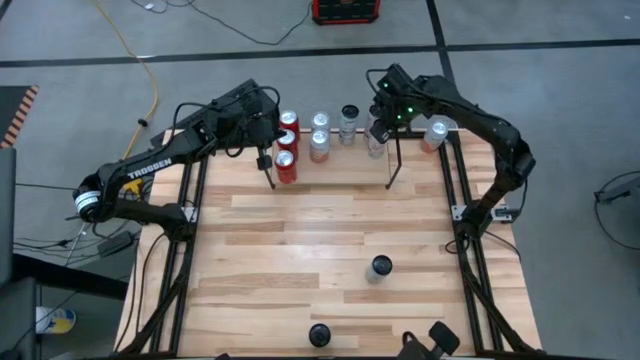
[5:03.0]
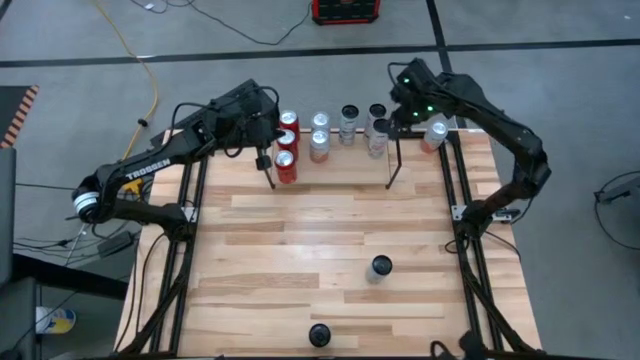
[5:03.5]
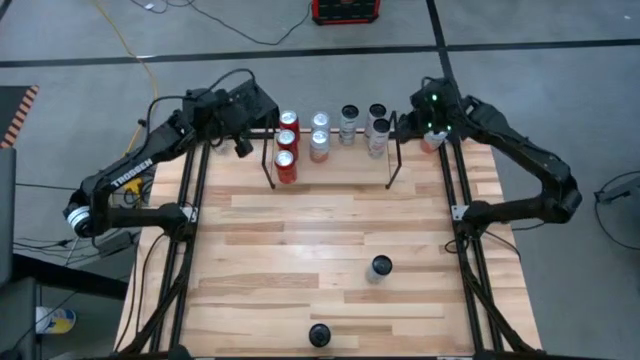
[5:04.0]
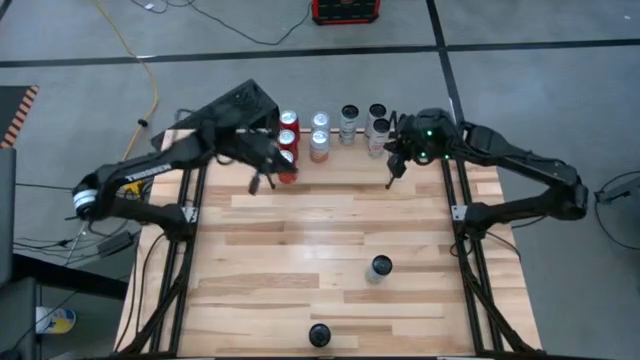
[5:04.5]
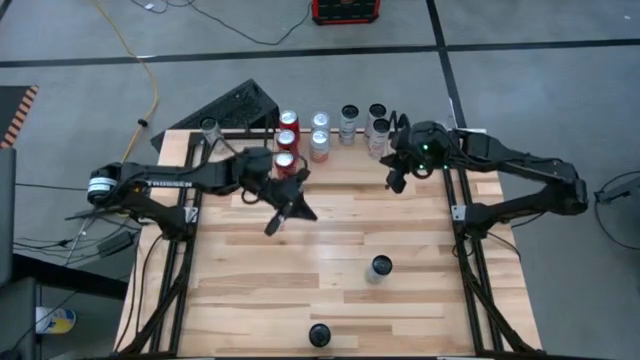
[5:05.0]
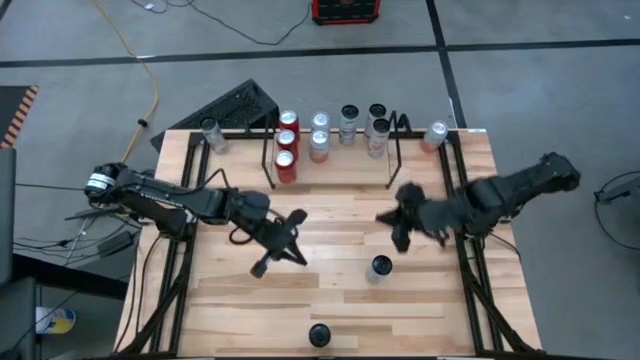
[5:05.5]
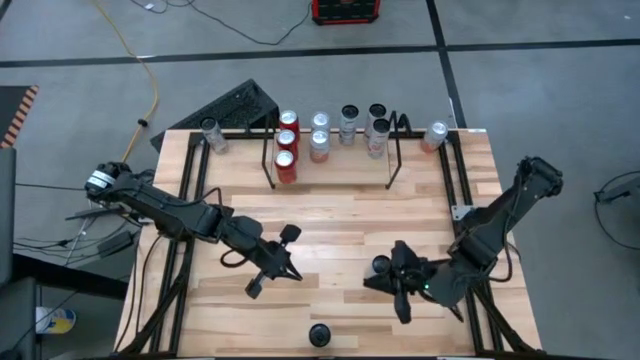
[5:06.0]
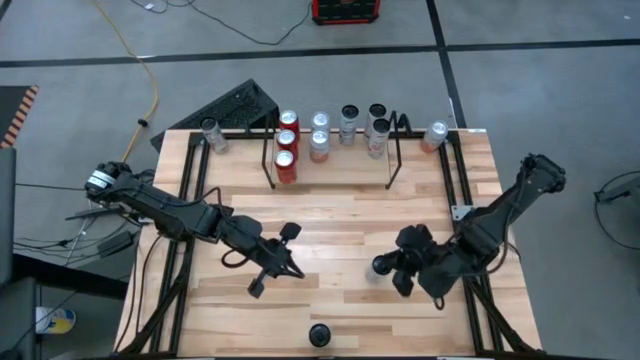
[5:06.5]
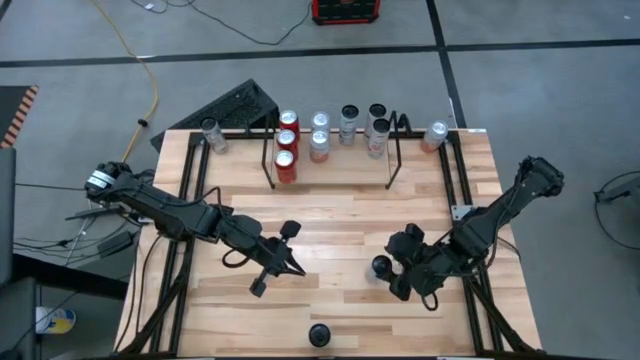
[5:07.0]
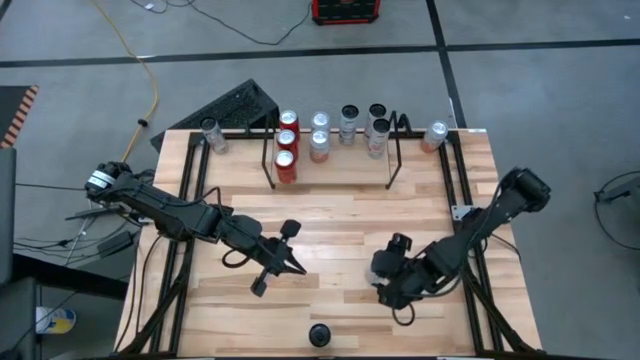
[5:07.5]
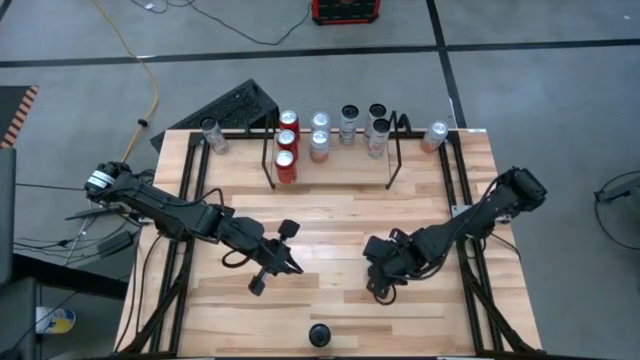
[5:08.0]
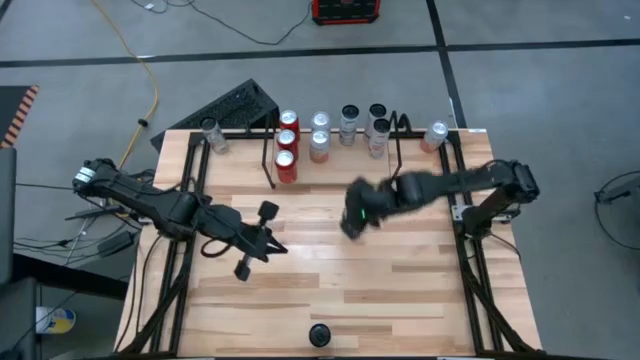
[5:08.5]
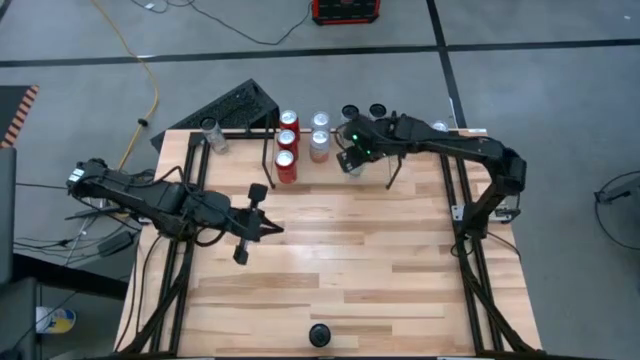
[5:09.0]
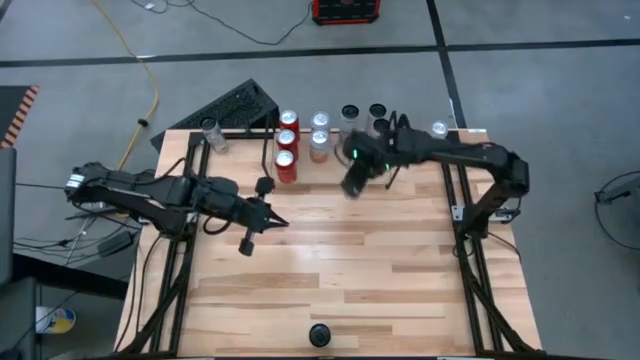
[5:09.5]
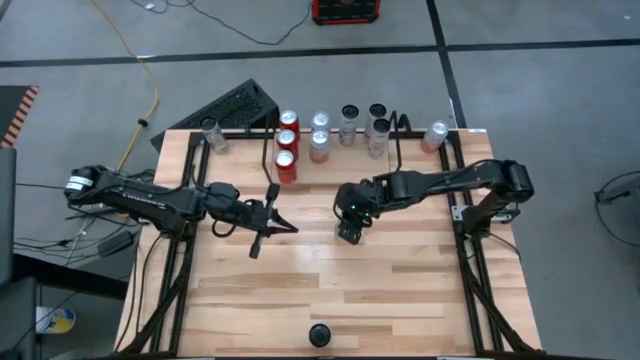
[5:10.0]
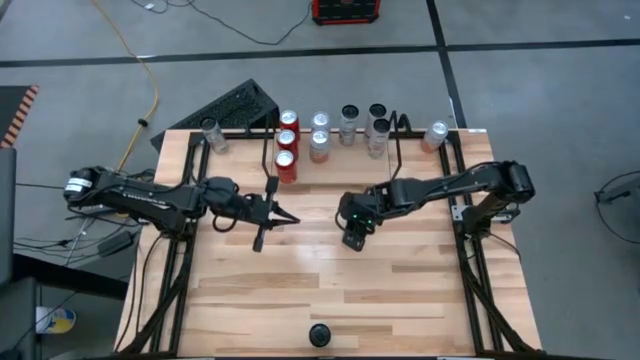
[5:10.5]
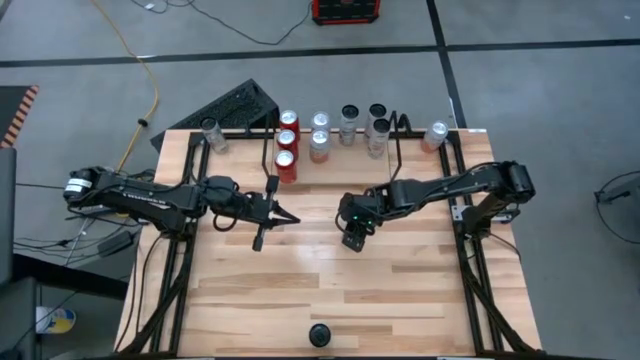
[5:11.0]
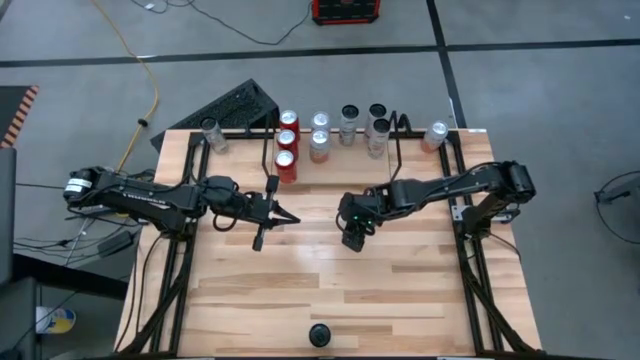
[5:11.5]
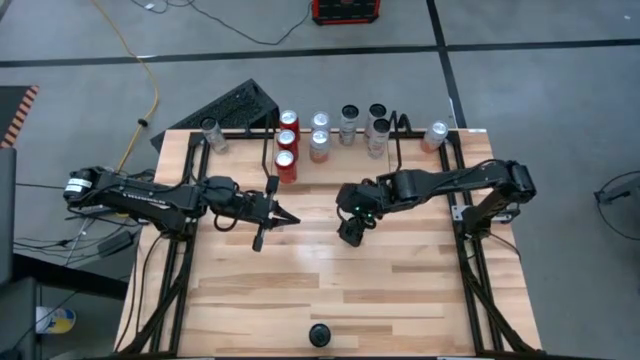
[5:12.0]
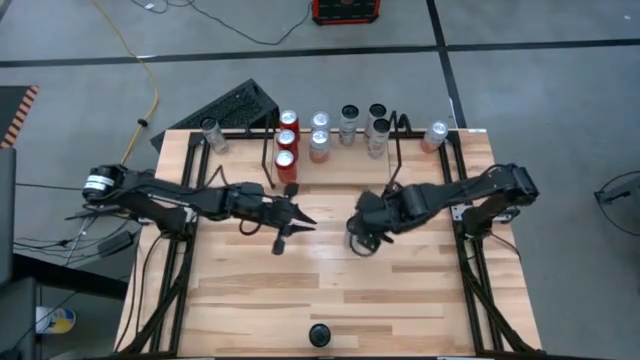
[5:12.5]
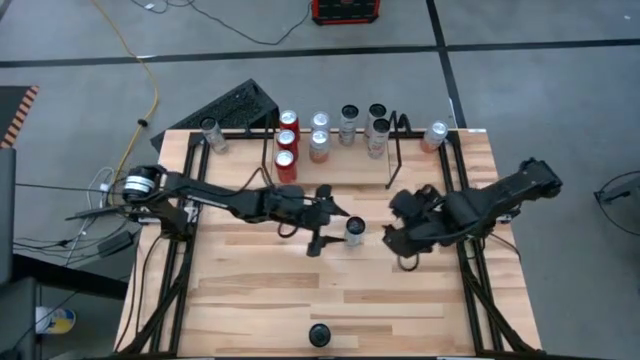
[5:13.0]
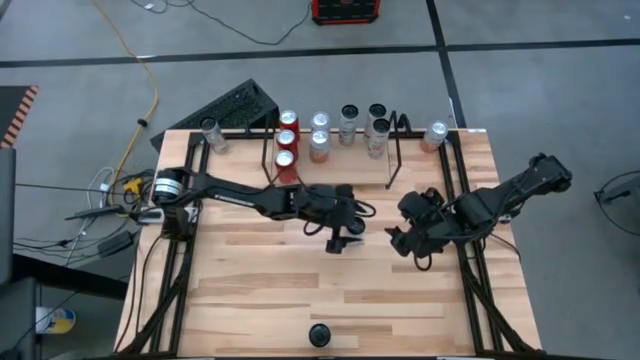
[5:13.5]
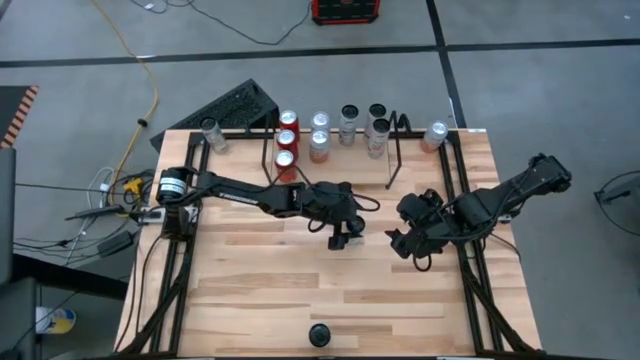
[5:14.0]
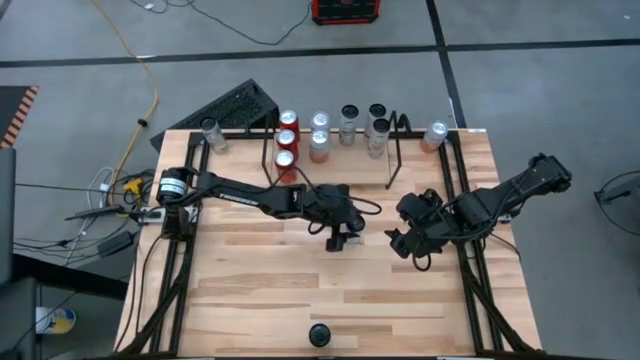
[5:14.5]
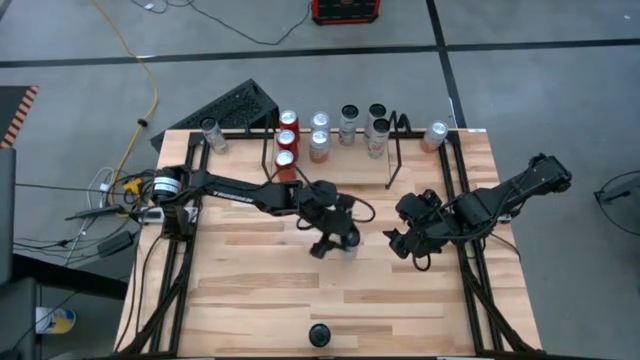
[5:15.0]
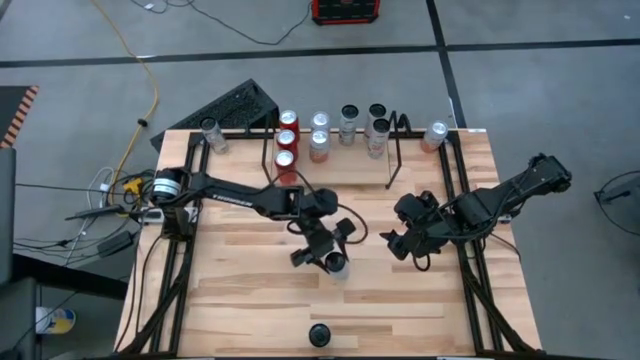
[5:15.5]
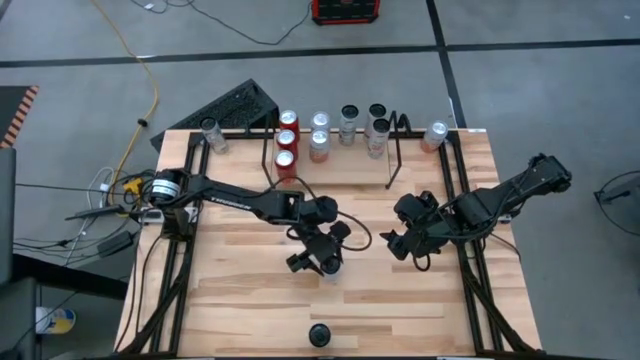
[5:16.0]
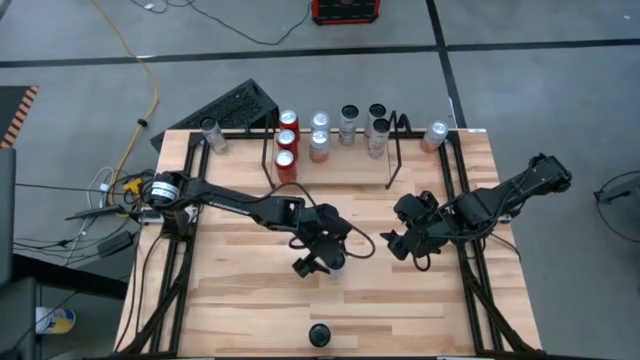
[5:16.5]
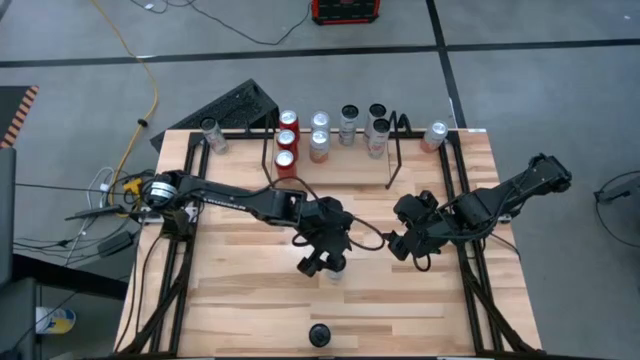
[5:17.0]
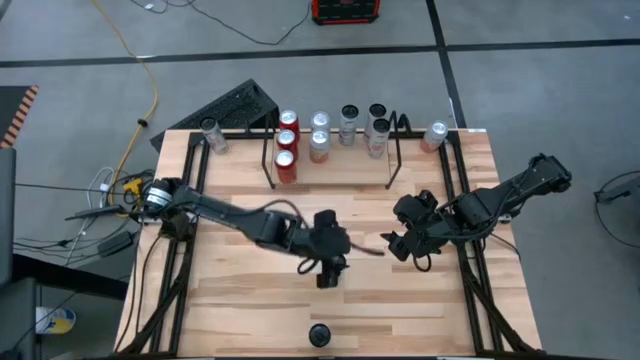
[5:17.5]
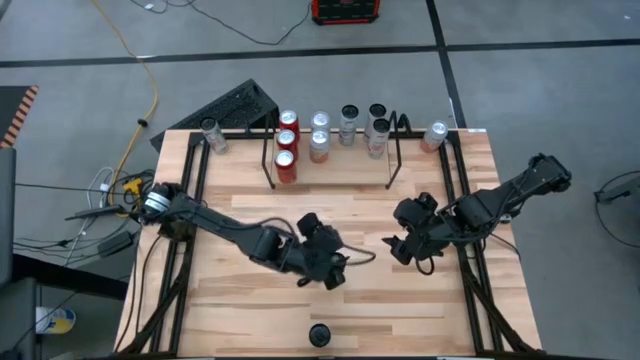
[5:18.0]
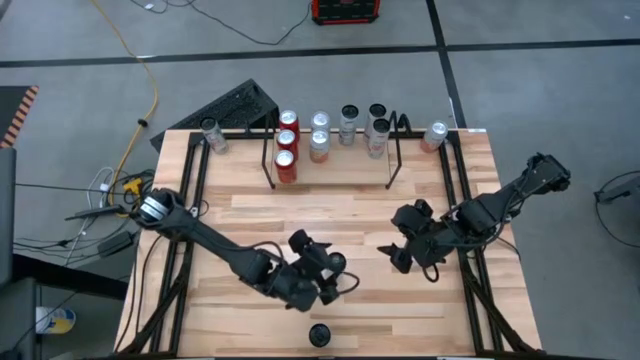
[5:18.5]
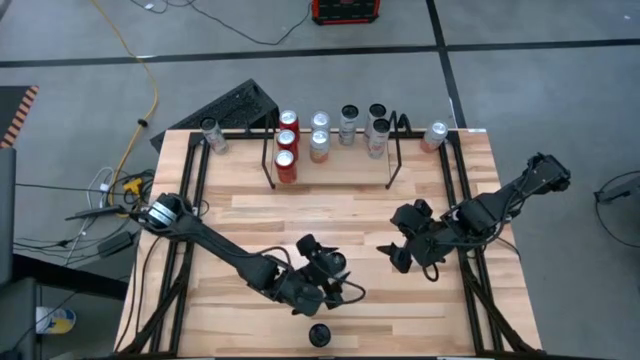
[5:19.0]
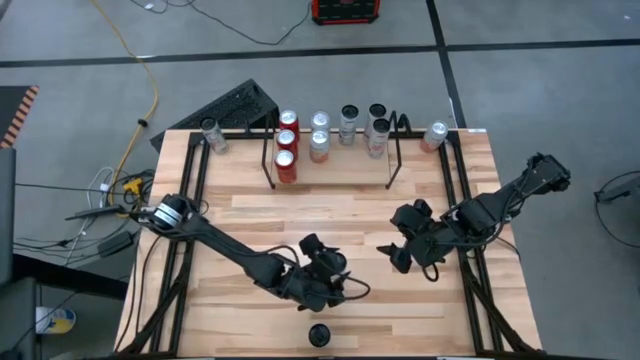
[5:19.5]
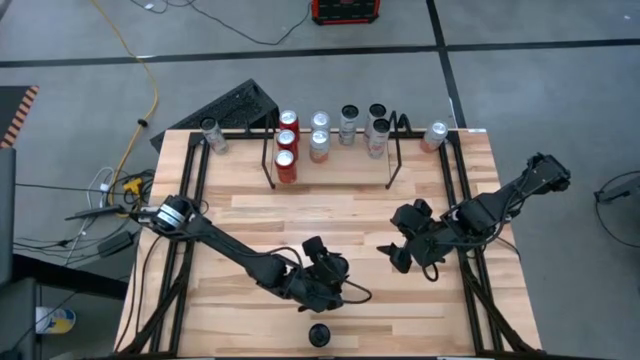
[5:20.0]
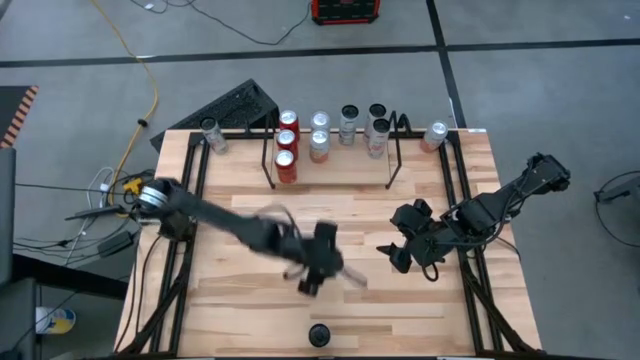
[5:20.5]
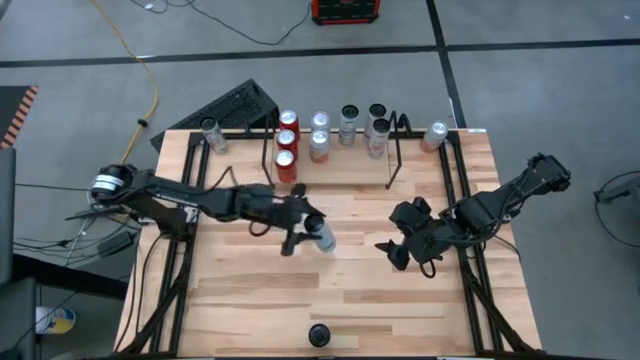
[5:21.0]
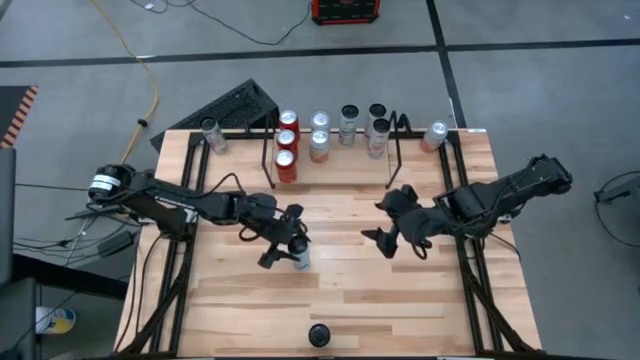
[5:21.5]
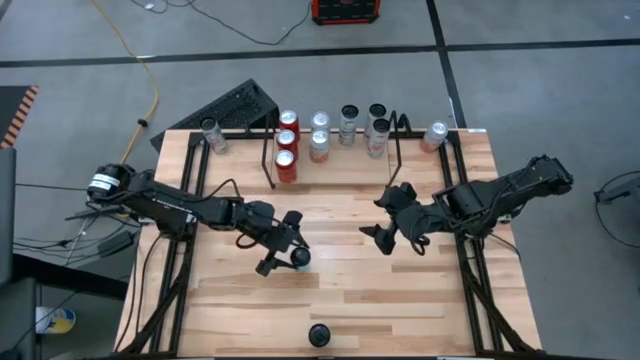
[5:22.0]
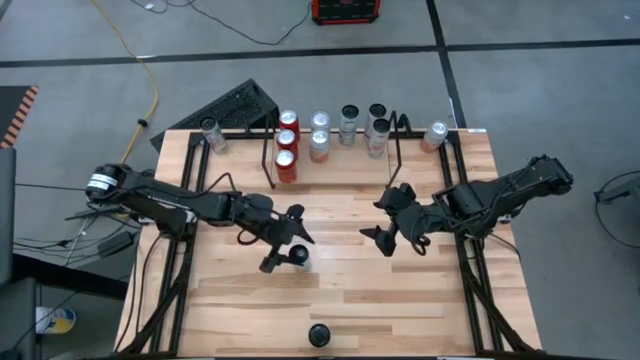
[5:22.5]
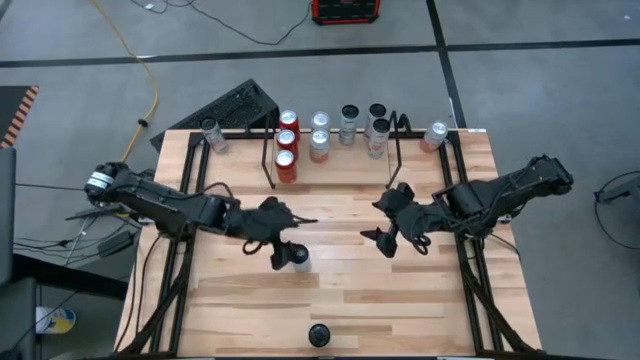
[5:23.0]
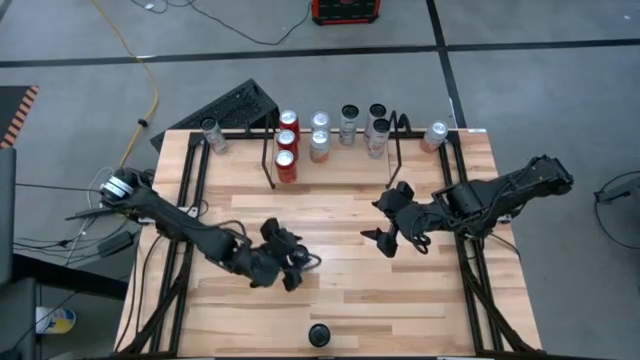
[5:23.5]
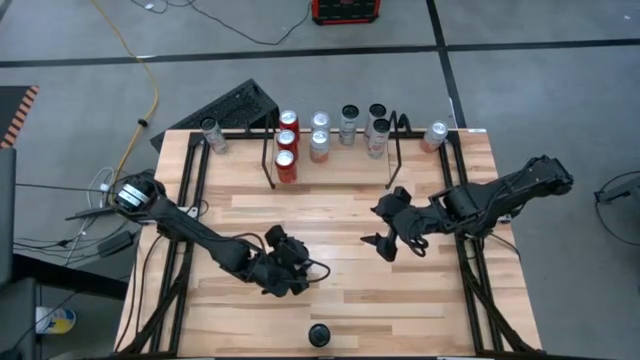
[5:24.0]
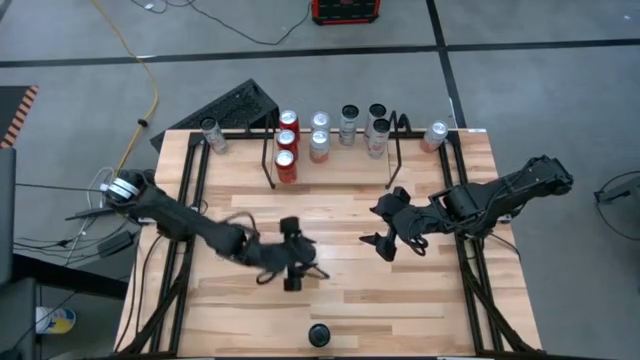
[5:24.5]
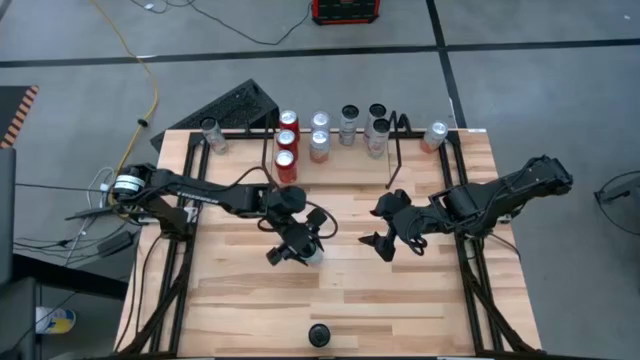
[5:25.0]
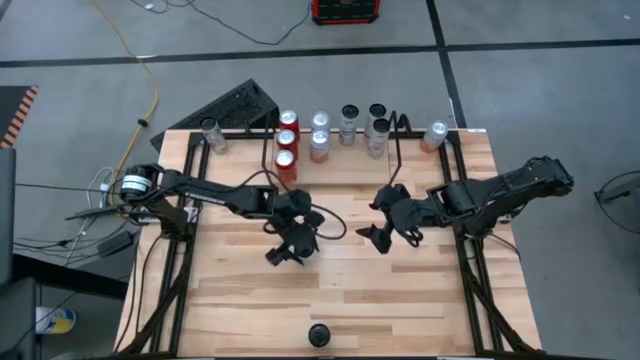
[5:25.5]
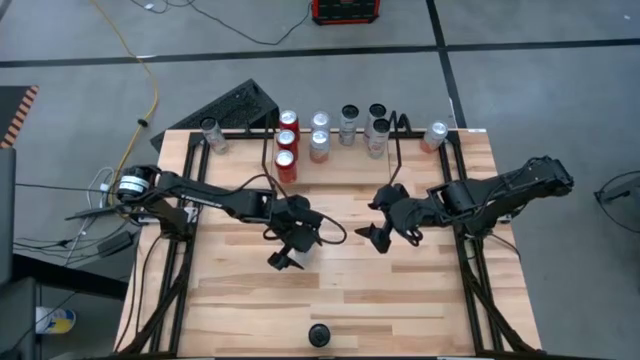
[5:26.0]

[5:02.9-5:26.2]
Task: Place canned beverage on shelf
Put the top white blue soda can on the shelf aligned with the other white blue soda can
